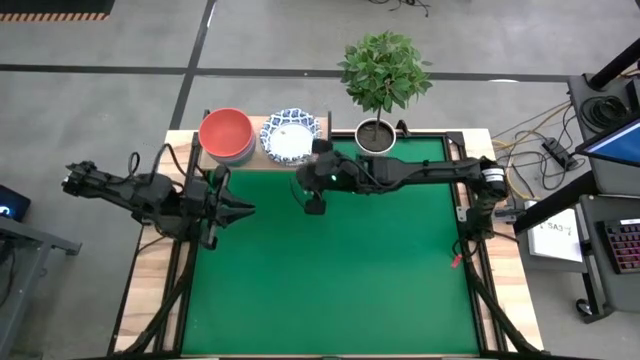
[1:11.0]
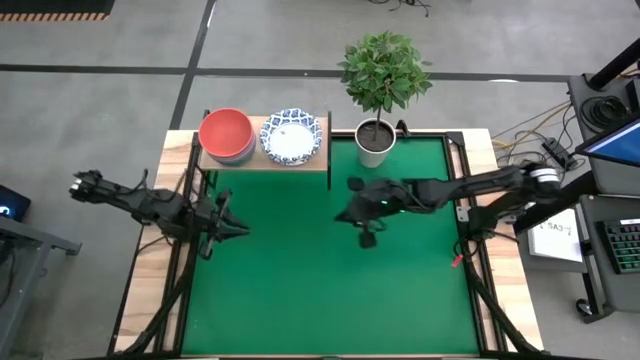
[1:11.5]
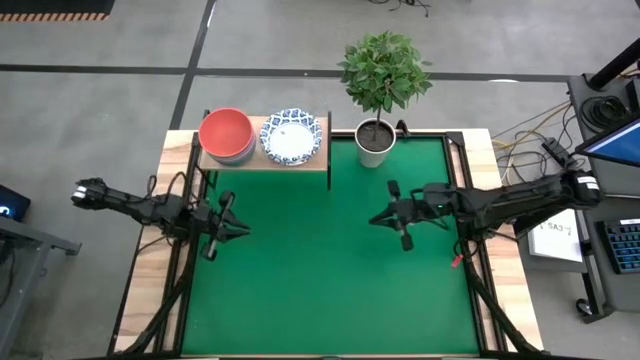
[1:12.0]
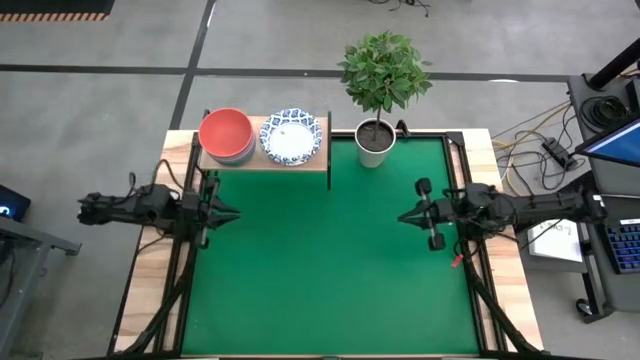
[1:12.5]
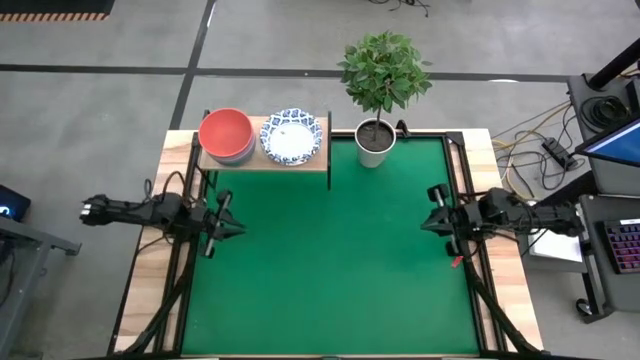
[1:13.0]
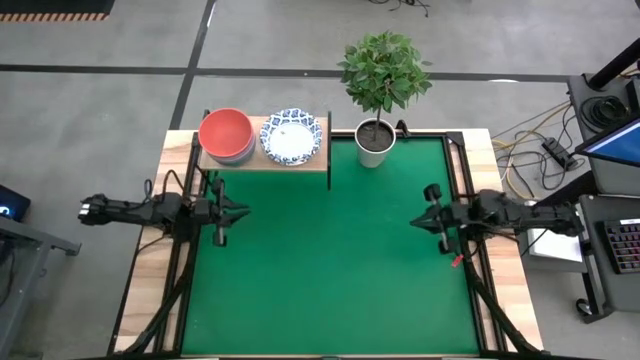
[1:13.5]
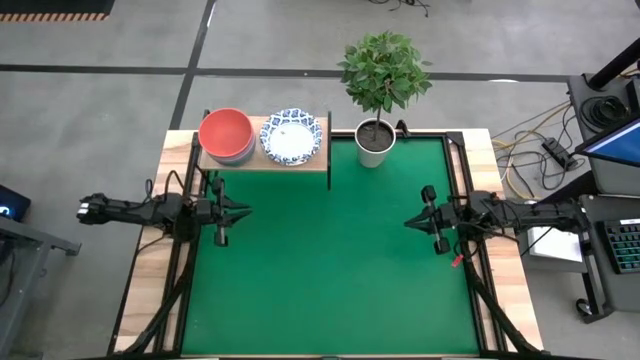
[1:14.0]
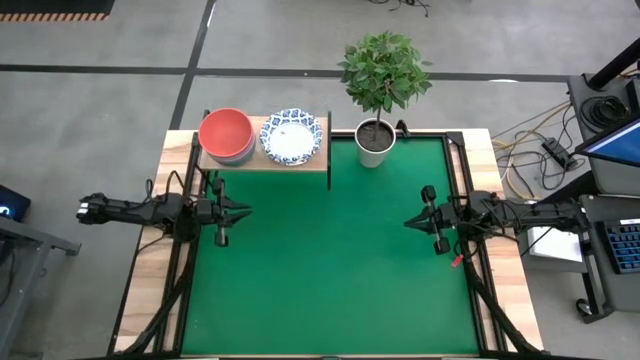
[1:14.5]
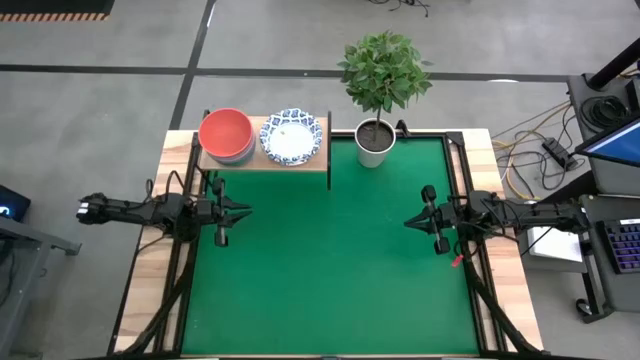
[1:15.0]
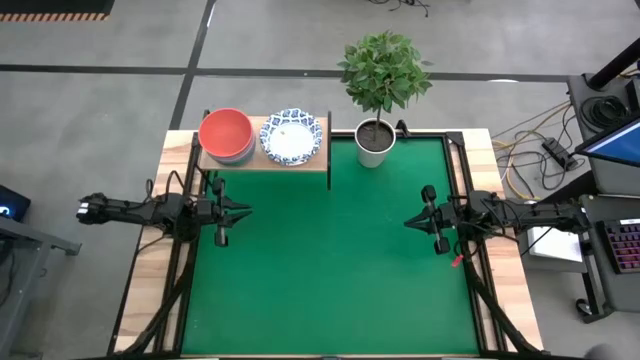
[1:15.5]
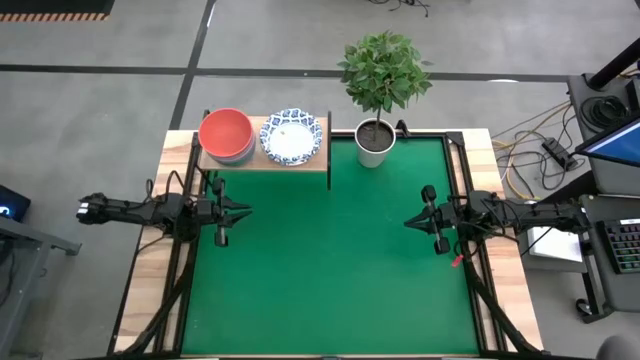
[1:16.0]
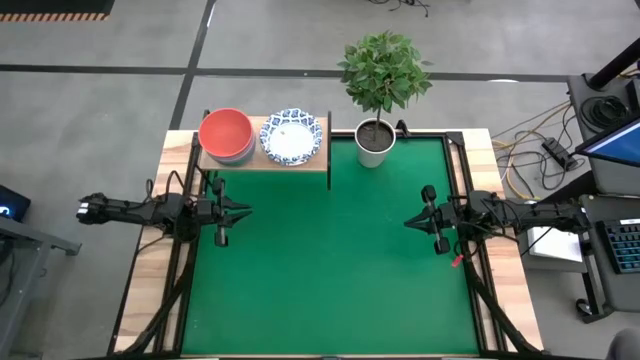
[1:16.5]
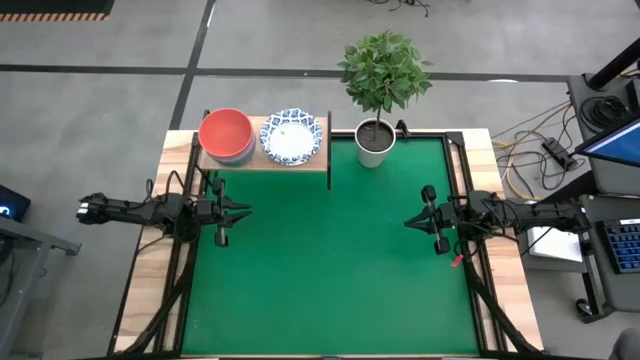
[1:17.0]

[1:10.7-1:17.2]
Task: Place and stack bowls onto a shelf
Return to Home Position

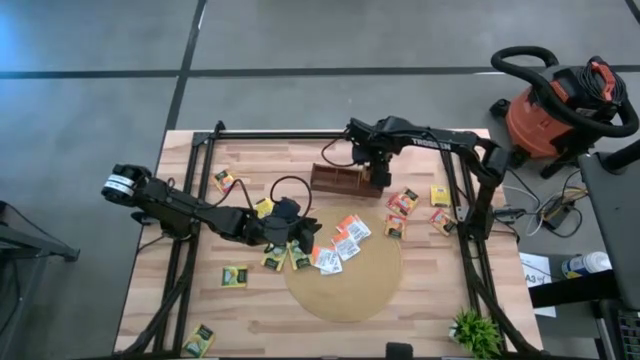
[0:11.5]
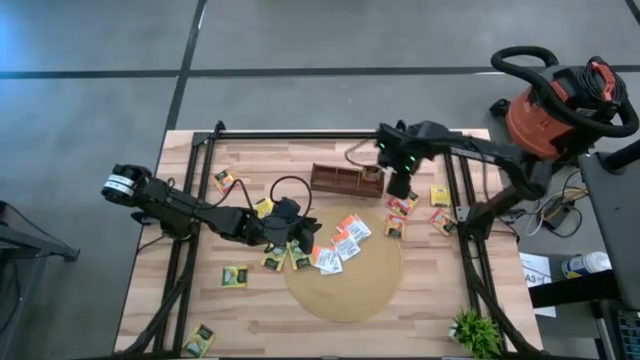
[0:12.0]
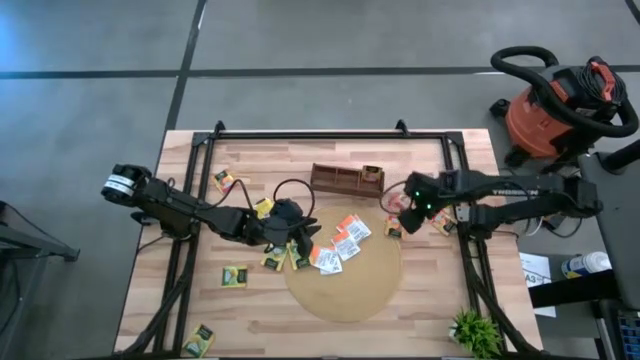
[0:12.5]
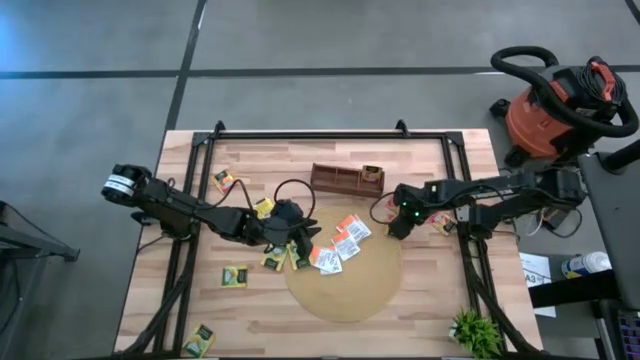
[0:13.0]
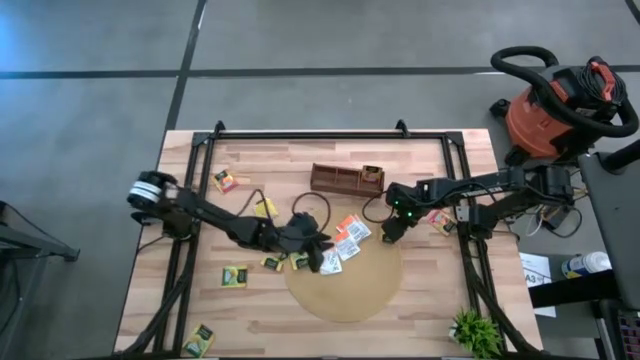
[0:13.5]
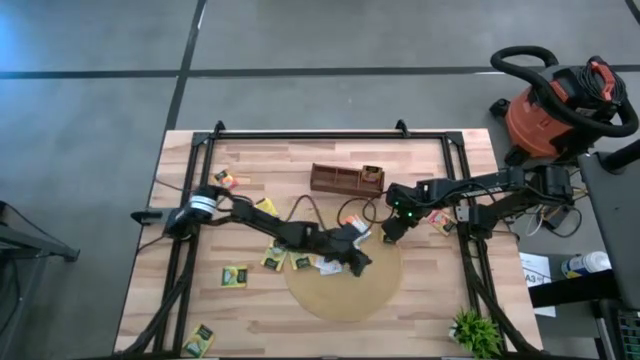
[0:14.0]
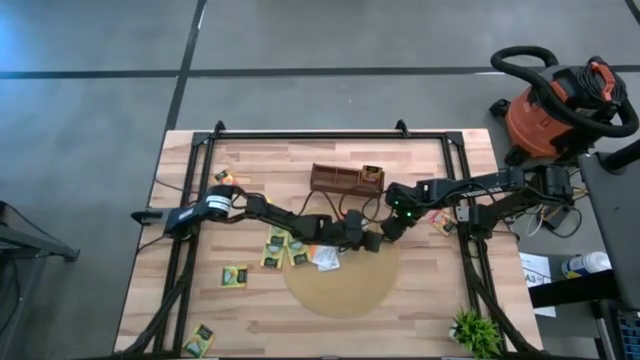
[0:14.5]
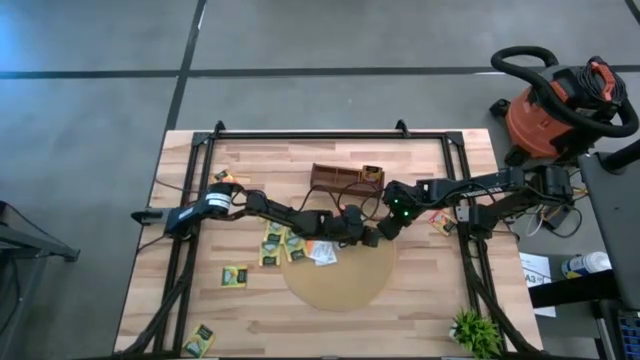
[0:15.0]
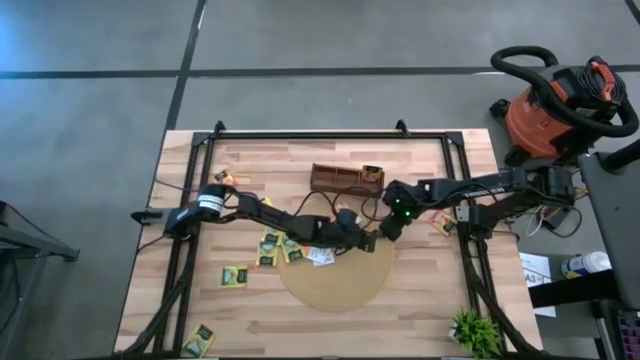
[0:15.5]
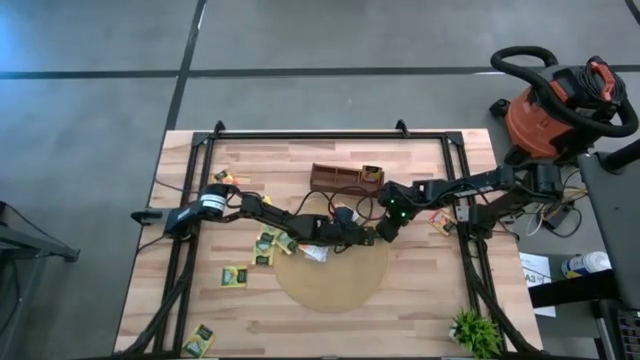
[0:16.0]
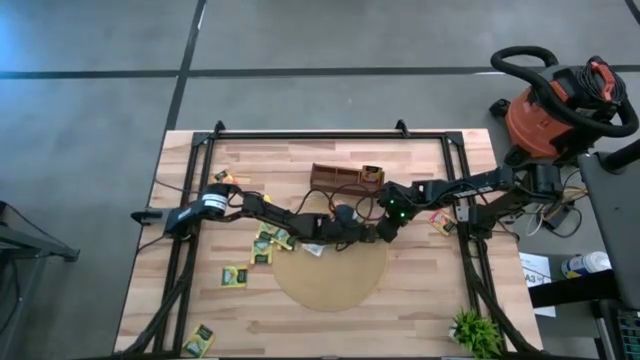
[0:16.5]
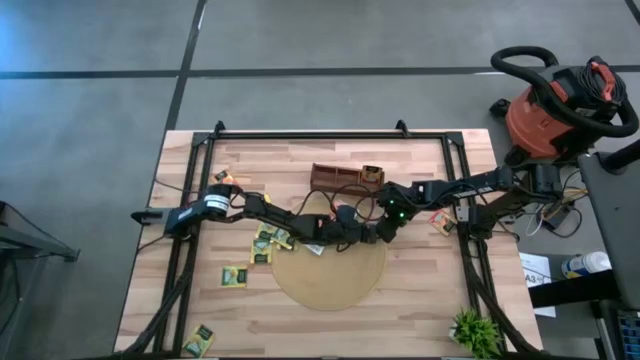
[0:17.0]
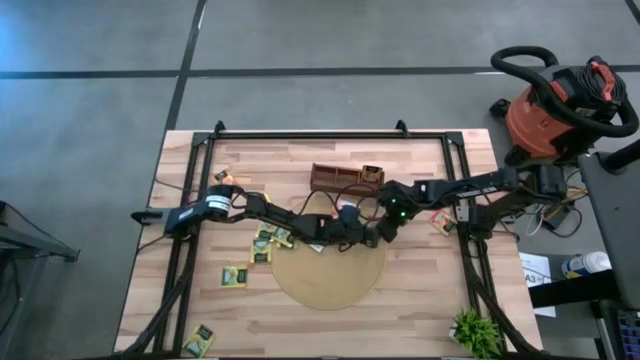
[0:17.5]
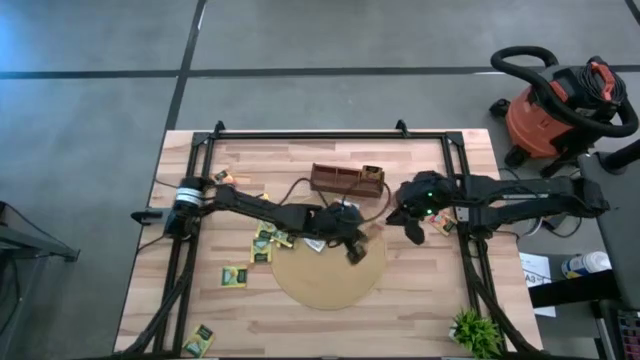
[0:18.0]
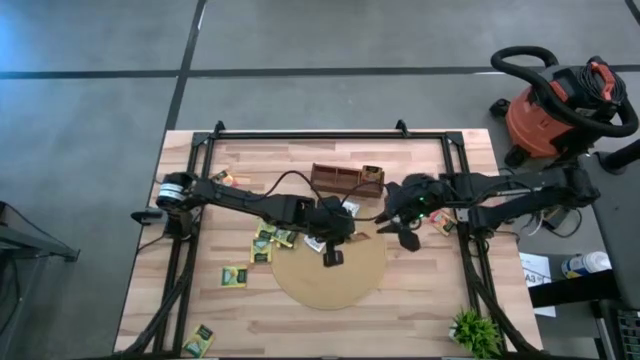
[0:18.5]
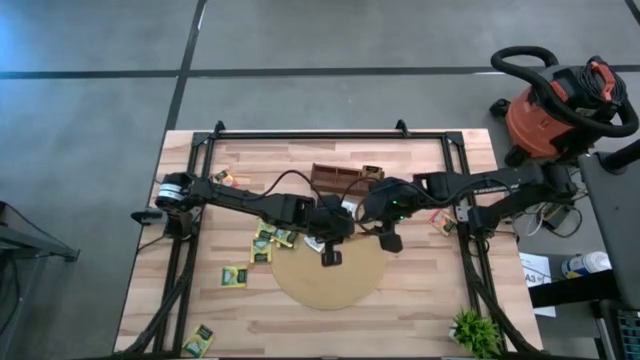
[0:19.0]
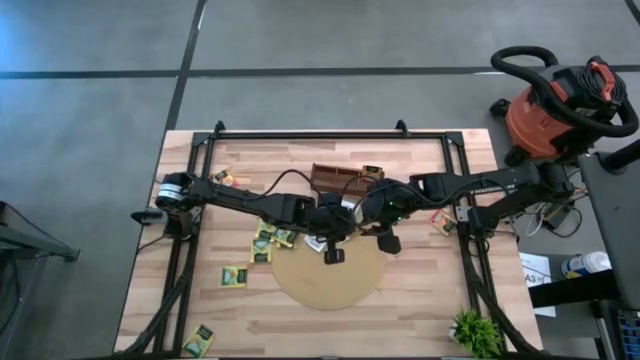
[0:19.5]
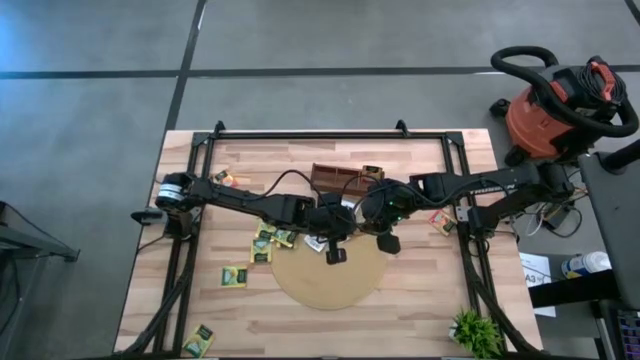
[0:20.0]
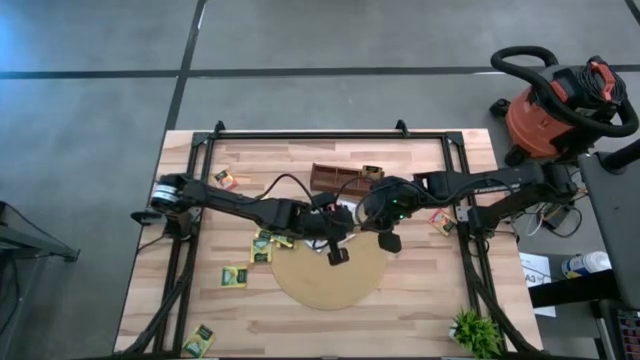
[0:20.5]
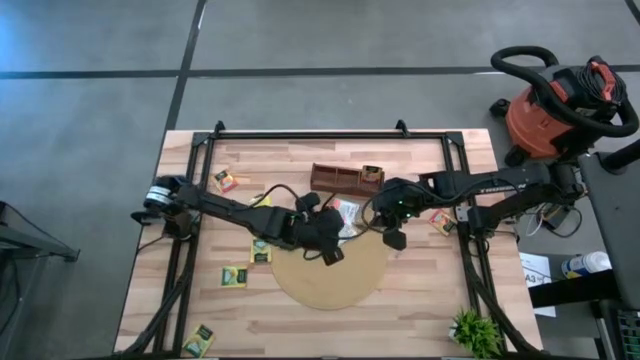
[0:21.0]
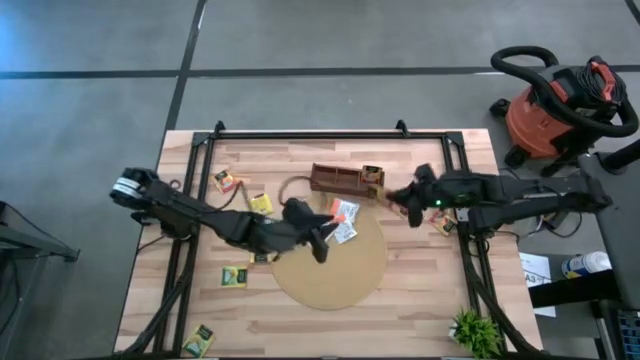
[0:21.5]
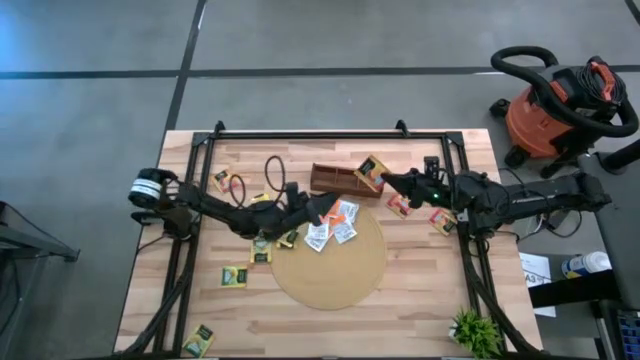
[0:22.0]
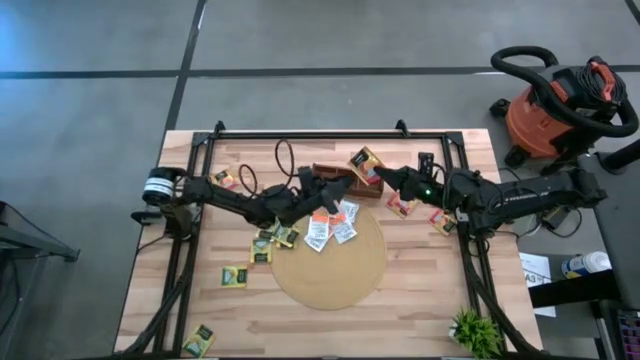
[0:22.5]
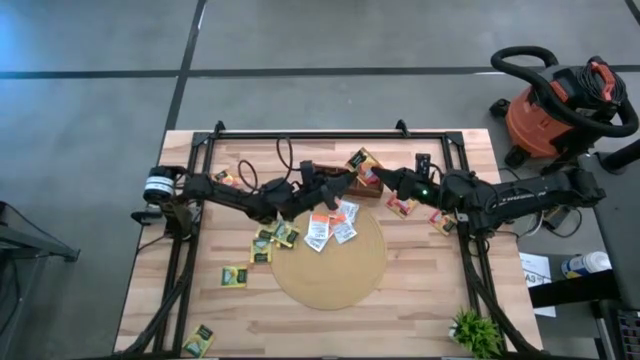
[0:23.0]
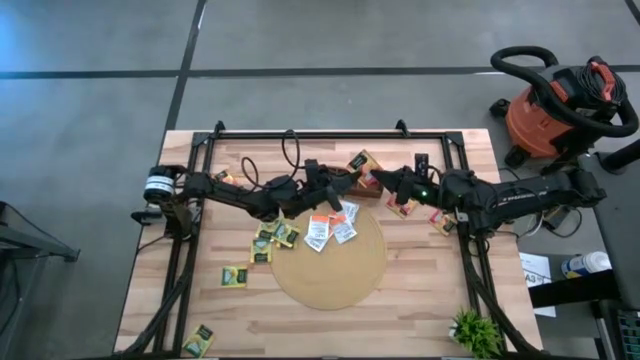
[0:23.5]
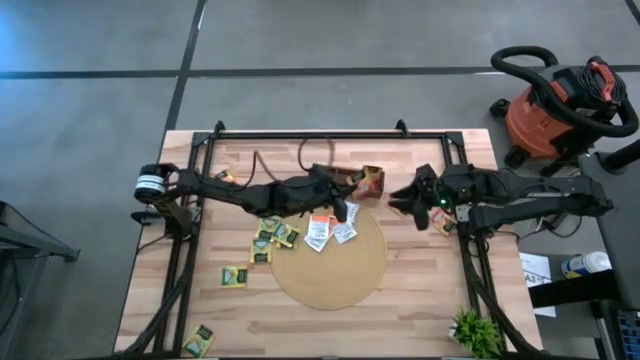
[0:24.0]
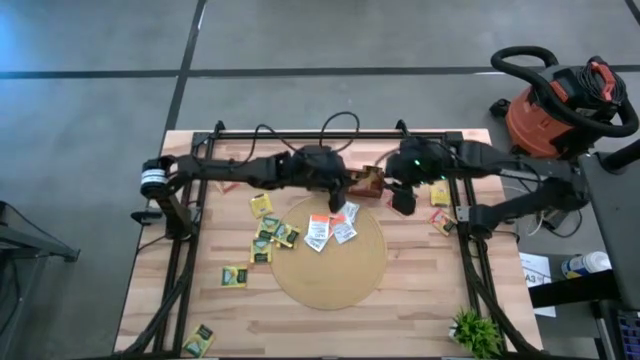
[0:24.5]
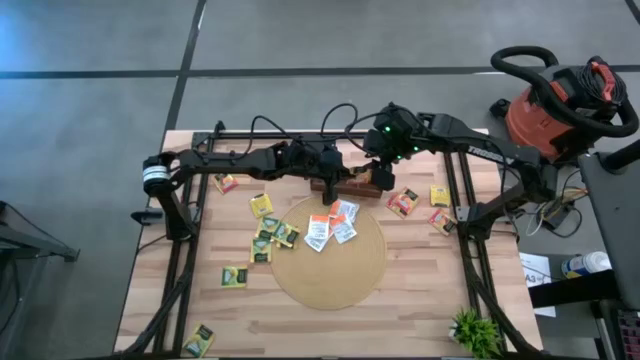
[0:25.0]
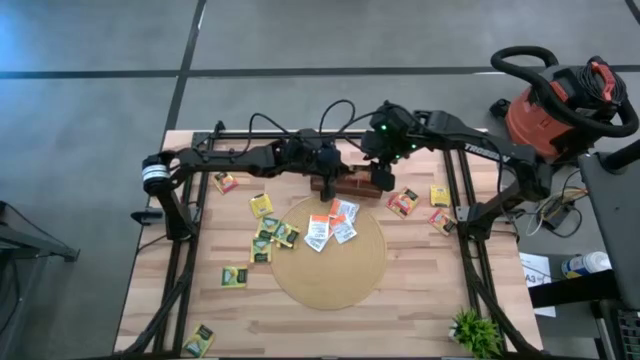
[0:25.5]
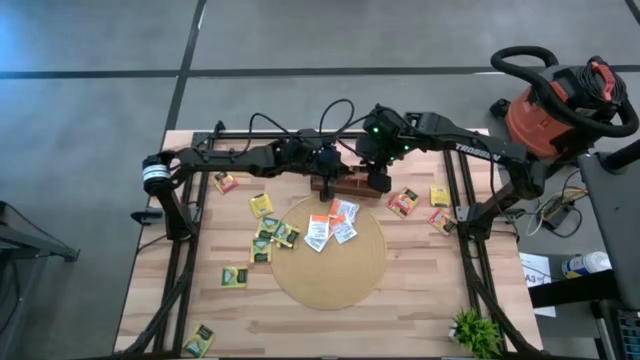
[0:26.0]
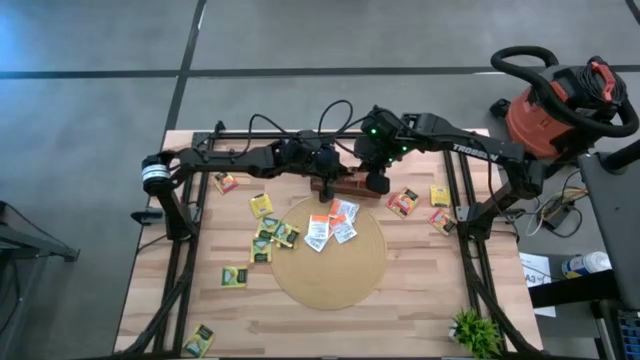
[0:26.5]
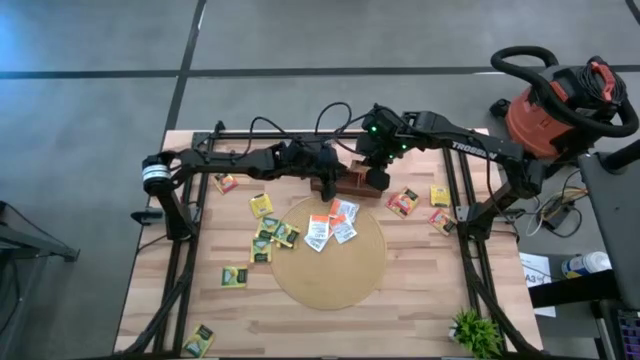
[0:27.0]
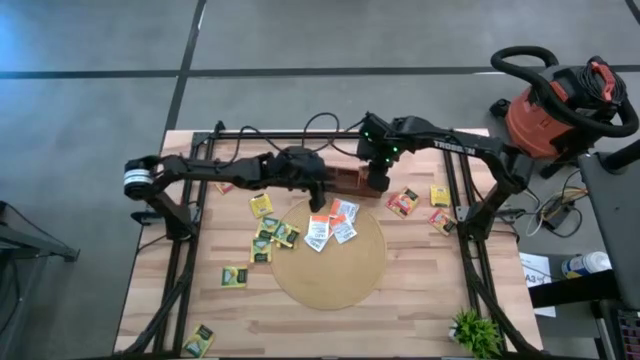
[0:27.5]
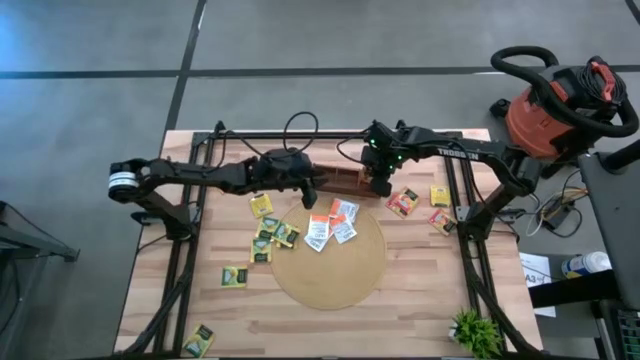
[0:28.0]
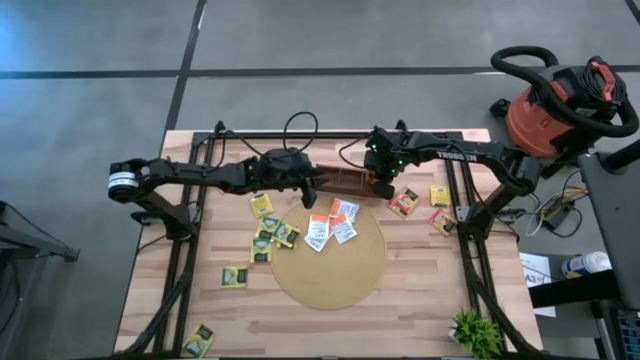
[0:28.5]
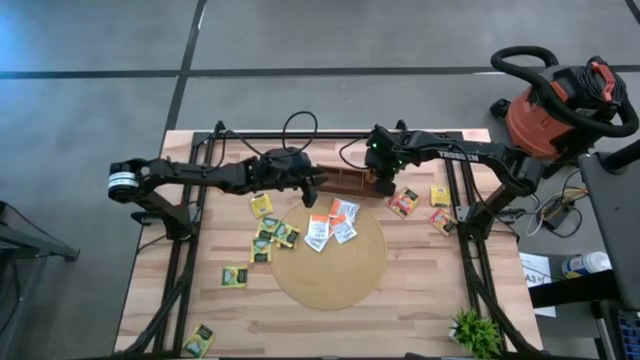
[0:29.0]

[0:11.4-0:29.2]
Task: Pick & Place Tea
Put the mango tea bag into the right section of the wooden organizer
